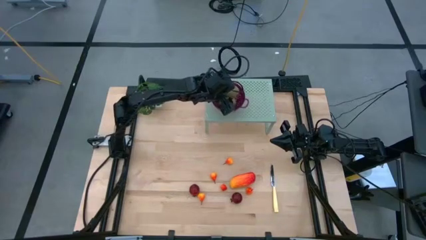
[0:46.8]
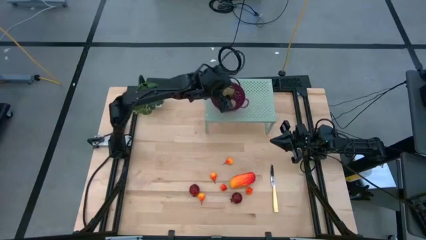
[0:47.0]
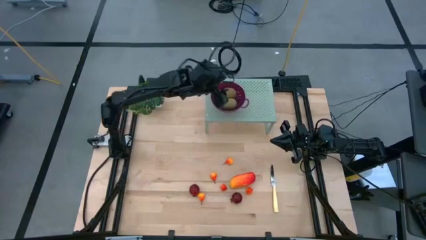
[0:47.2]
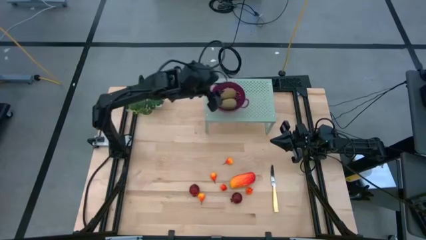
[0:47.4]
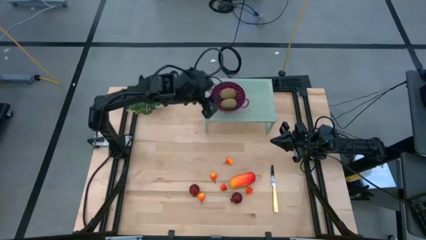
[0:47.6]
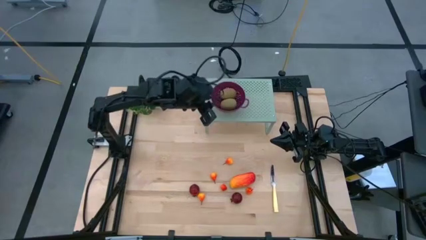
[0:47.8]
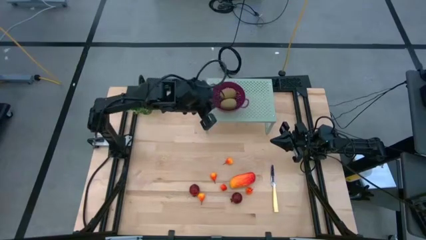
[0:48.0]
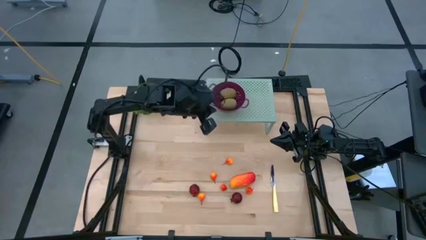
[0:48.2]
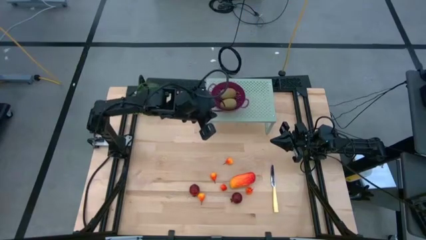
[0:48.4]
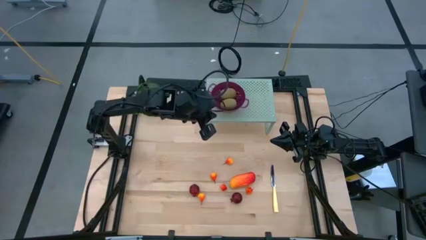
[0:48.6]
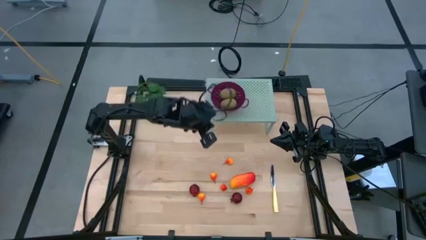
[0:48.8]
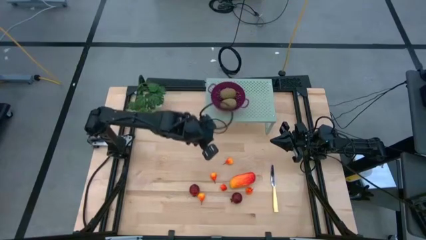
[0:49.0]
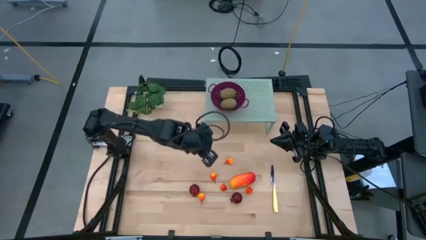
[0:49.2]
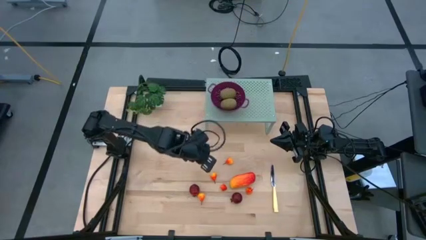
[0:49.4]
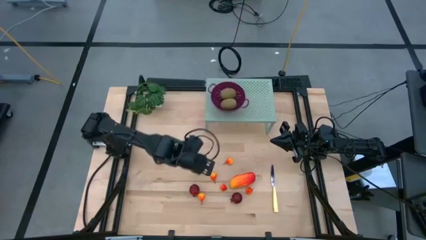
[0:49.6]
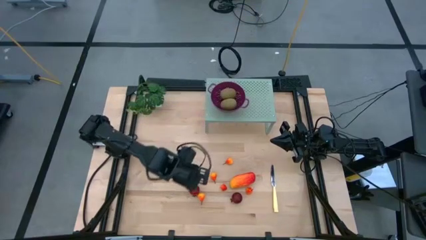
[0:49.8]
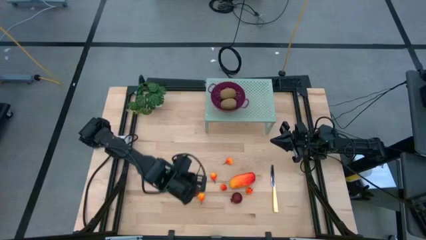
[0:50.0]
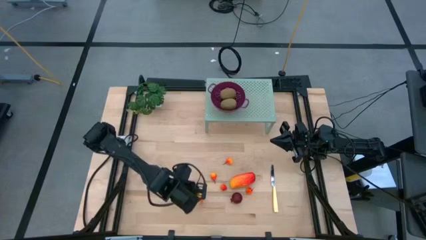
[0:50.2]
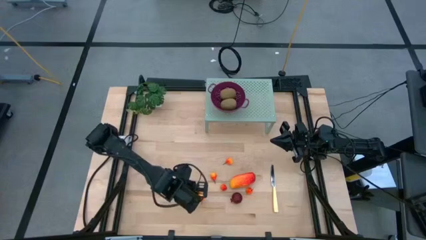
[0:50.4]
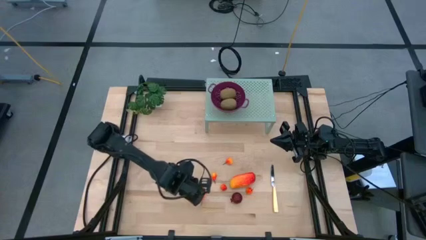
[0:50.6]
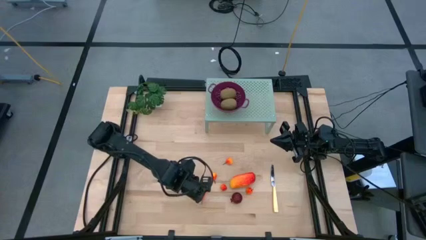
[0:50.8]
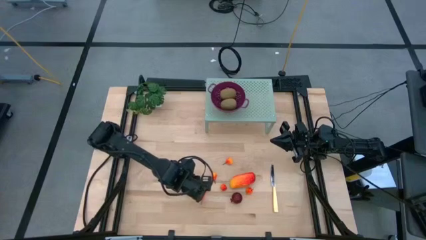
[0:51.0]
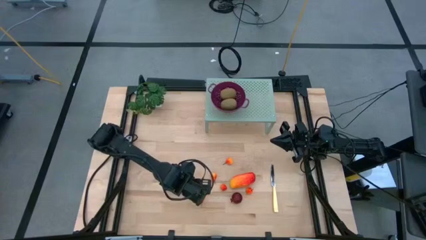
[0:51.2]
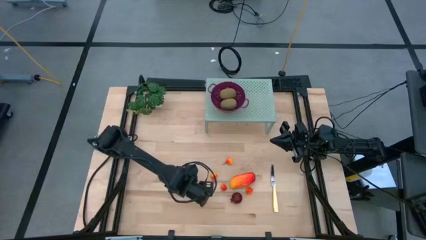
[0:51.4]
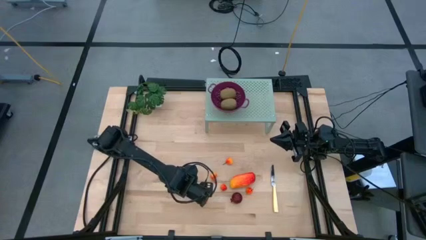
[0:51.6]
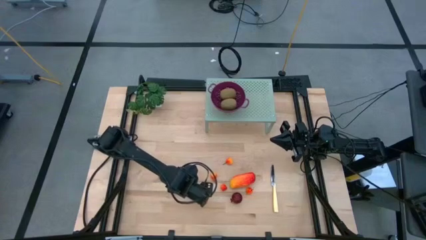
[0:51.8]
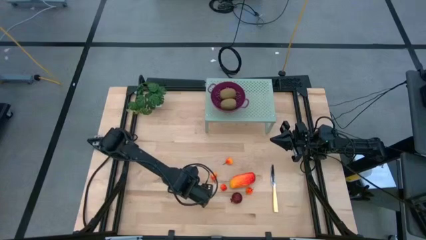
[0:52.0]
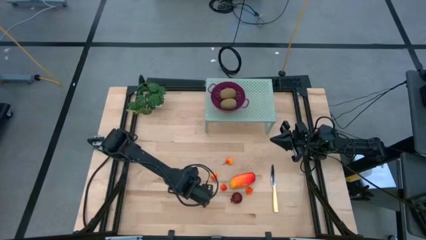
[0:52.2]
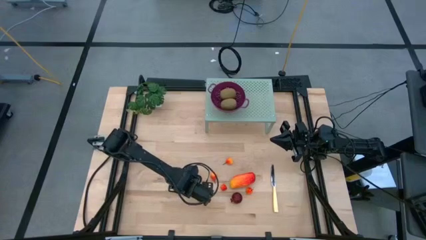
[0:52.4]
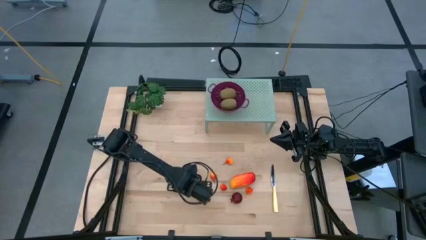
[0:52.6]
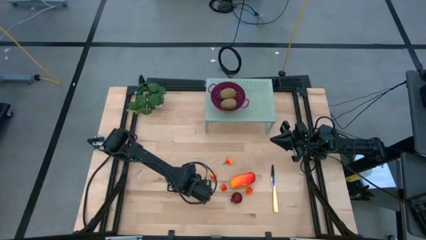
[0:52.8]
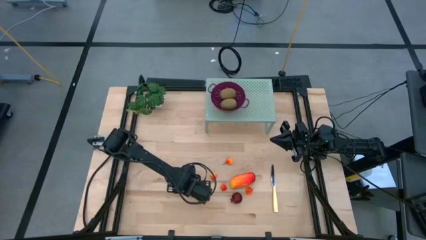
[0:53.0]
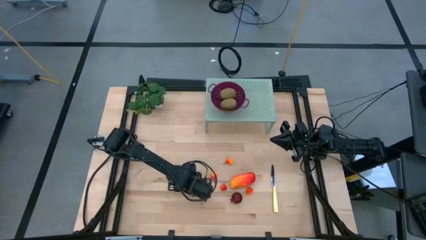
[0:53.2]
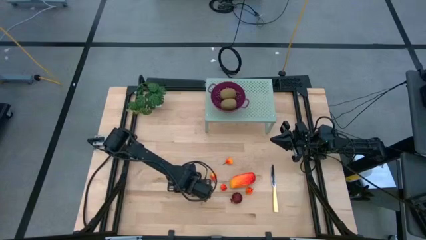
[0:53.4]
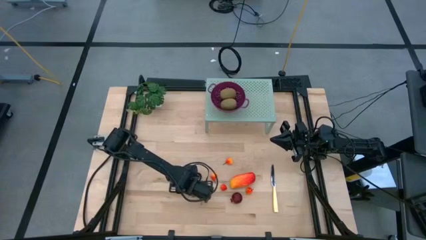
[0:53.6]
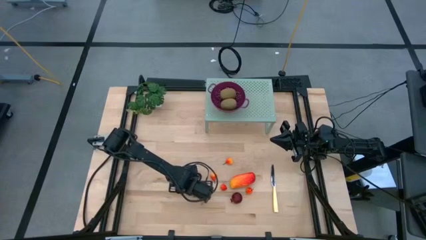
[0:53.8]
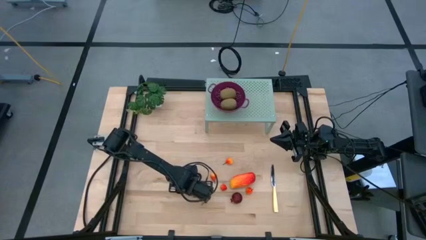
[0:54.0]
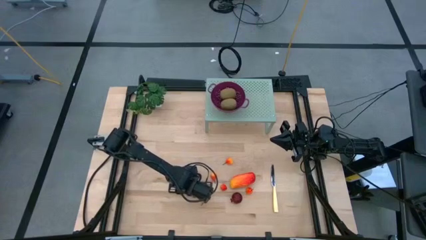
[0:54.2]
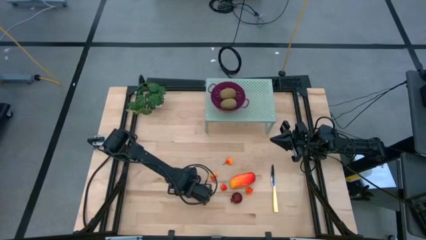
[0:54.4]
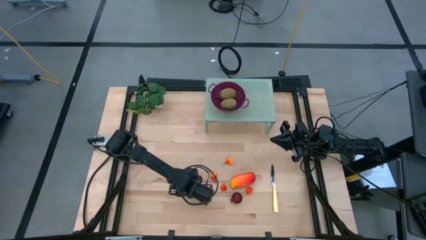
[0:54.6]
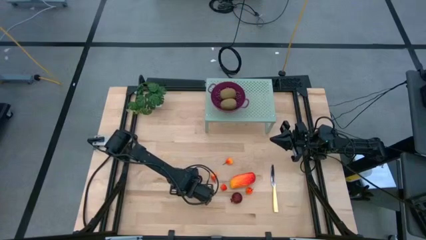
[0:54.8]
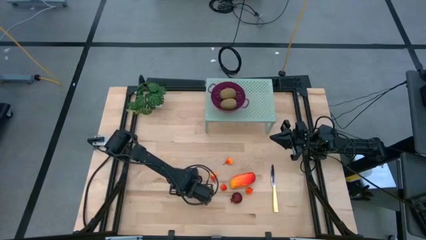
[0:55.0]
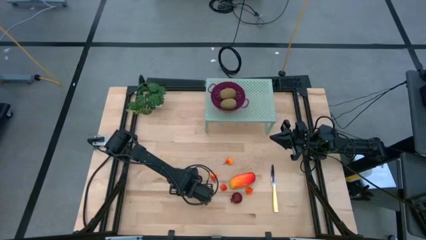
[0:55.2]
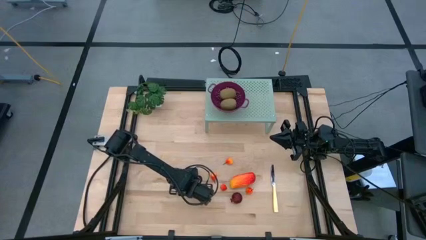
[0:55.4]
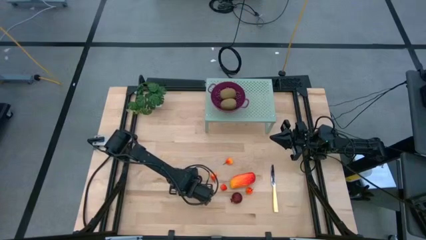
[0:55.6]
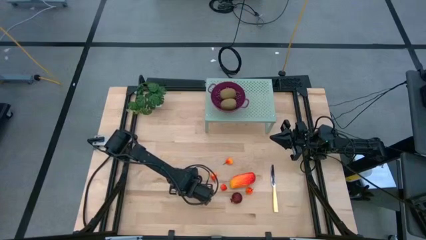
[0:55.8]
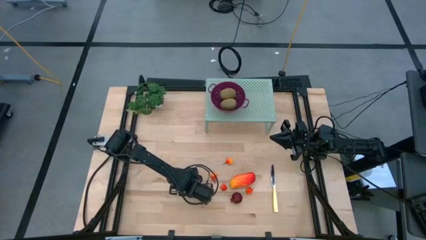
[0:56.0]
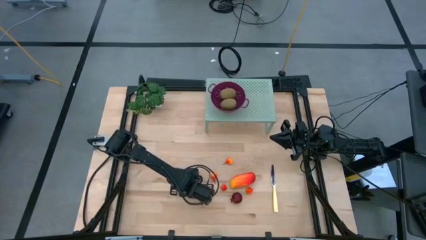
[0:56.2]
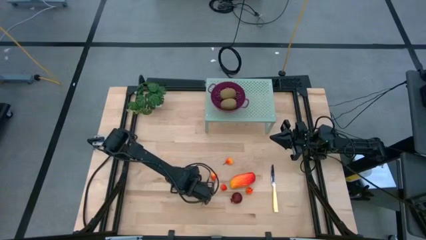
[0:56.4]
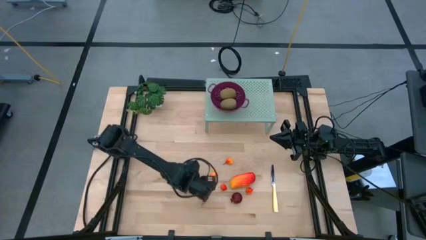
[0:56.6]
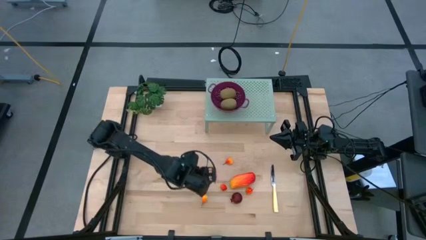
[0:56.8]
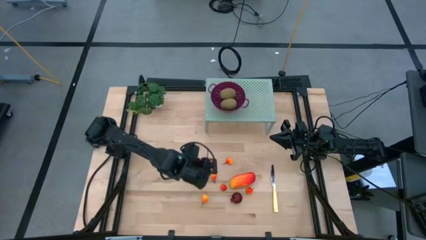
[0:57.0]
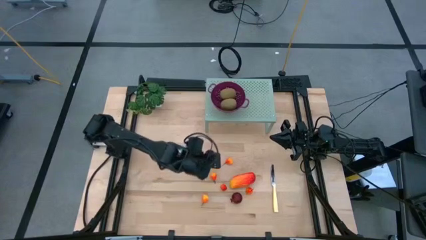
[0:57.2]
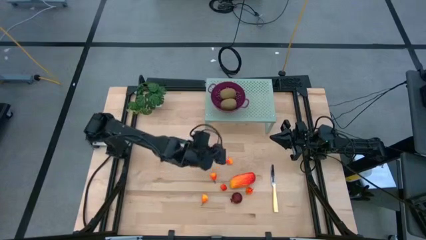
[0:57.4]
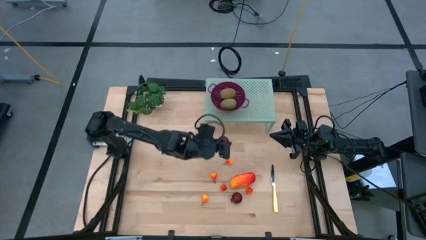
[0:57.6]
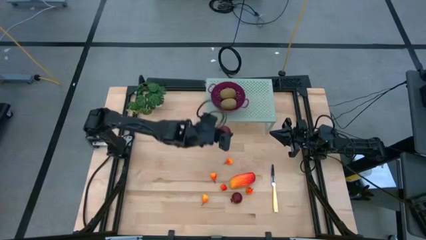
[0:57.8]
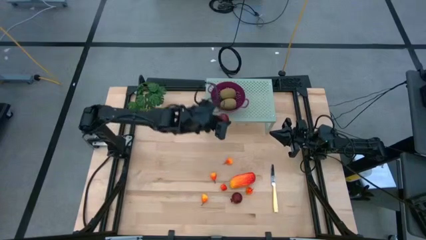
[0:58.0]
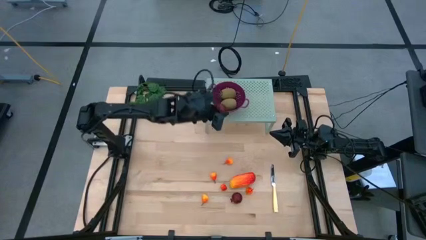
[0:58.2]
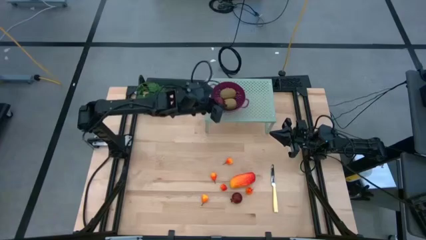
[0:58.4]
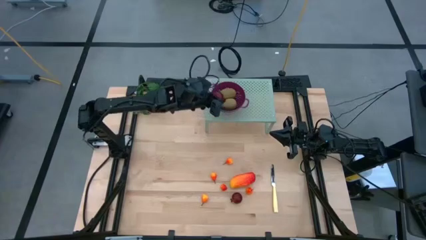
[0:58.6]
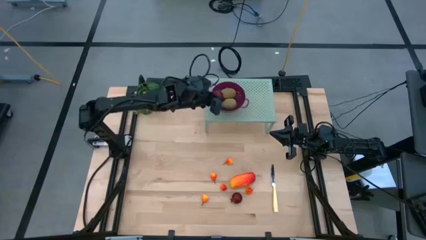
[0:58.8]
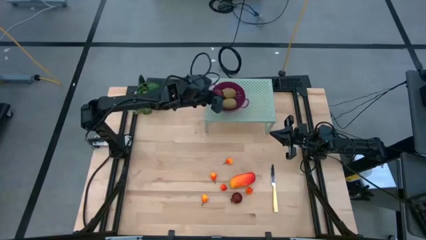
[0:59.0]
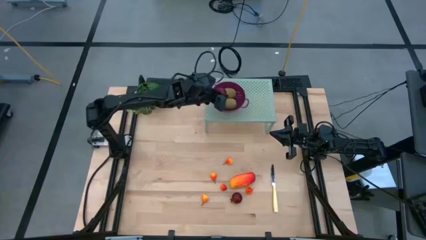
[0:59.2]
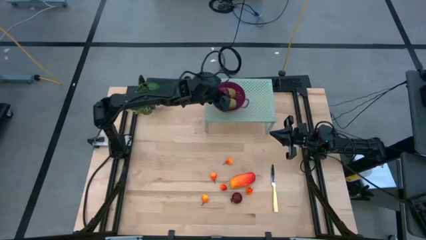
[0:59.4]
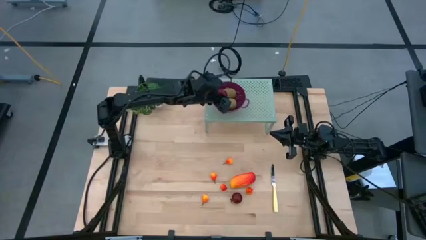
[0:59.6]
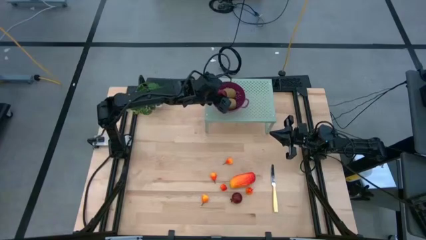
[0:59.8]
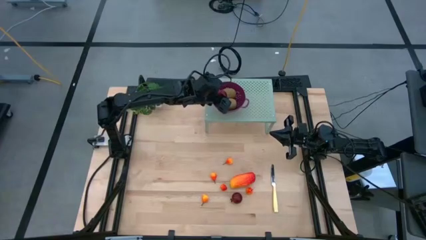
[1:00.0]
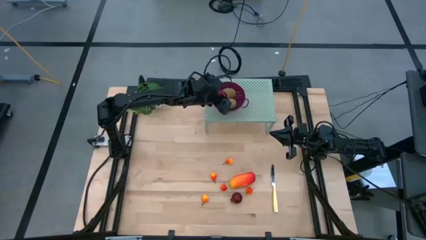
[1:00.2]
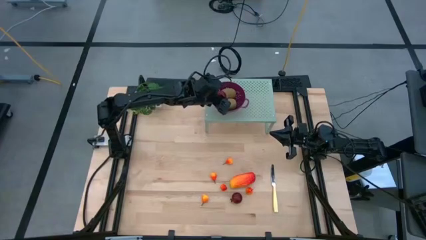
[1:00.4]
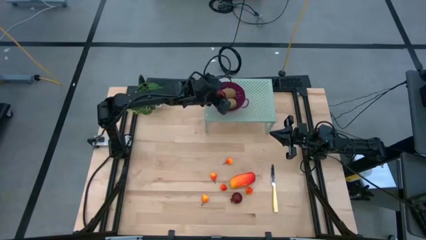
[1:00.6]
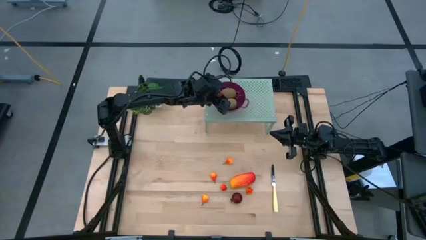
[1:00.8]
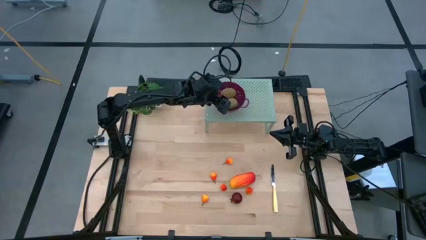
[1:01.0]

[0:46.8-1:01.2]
Task: Pick & Place Fruit
Put the pomegranate into the strainer bowl on the shelf

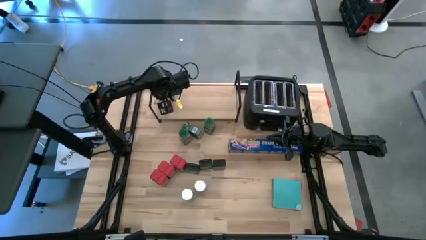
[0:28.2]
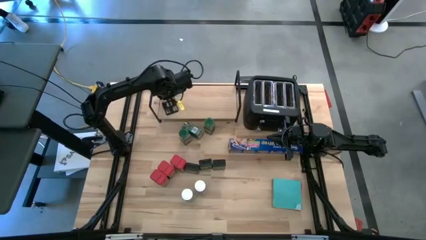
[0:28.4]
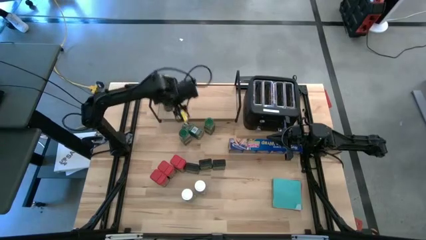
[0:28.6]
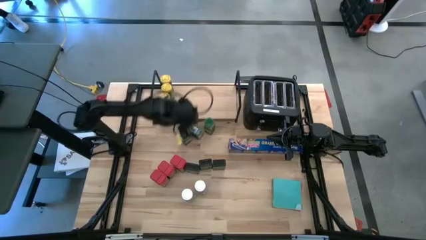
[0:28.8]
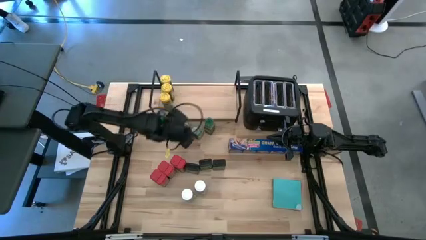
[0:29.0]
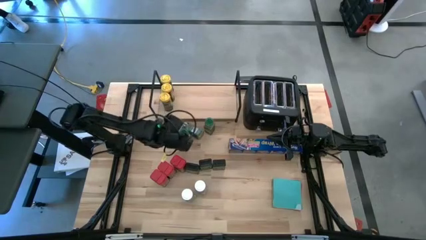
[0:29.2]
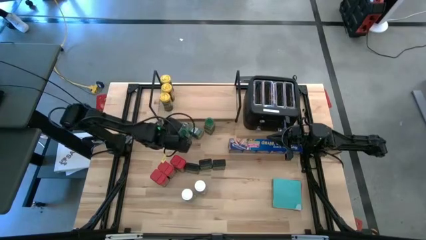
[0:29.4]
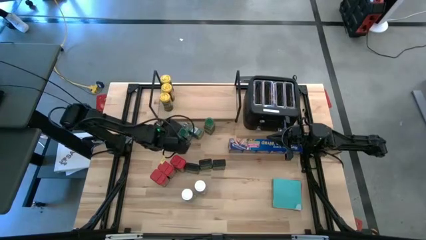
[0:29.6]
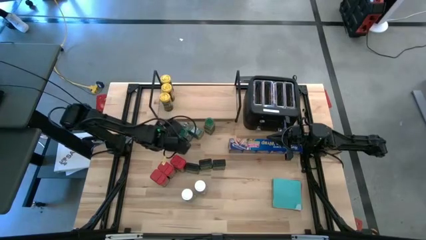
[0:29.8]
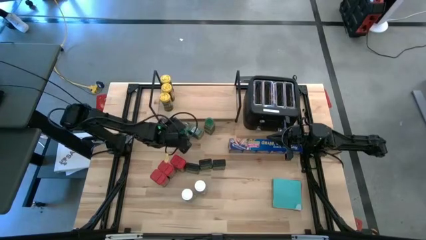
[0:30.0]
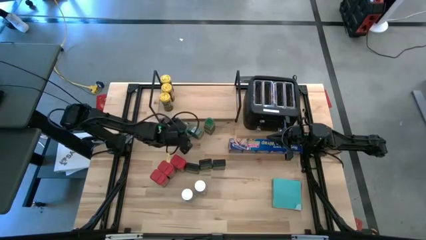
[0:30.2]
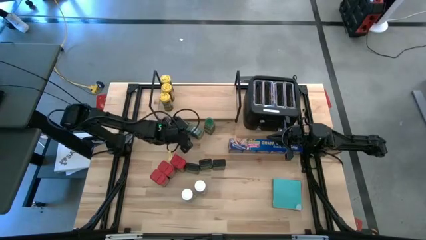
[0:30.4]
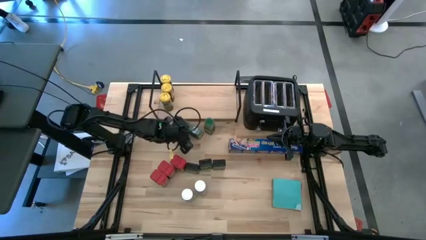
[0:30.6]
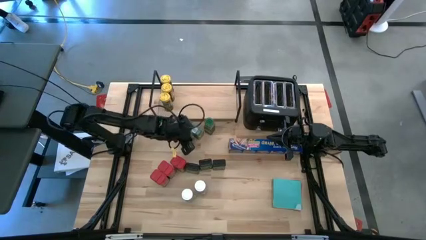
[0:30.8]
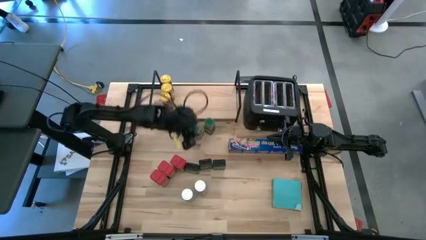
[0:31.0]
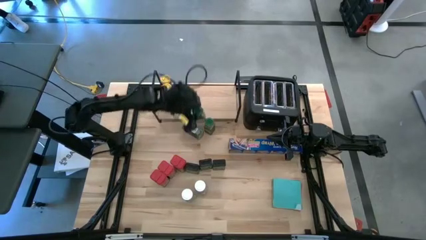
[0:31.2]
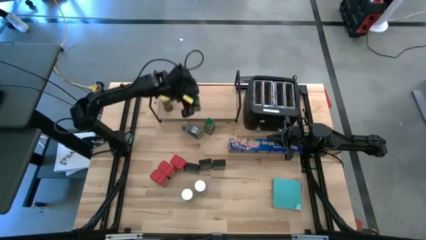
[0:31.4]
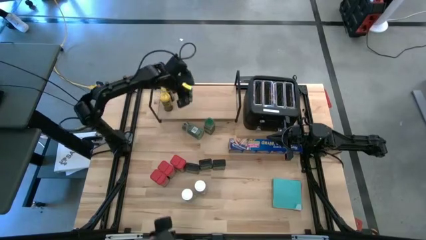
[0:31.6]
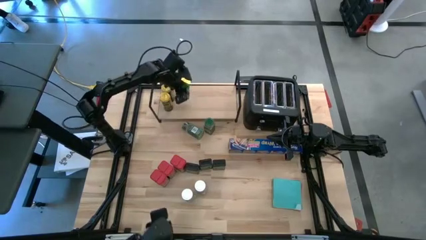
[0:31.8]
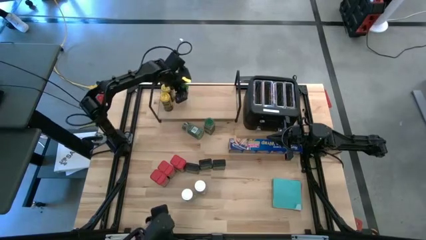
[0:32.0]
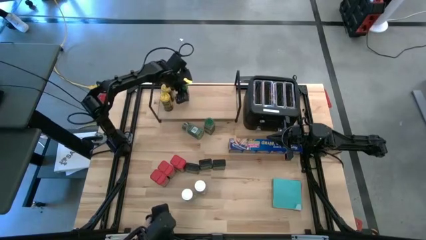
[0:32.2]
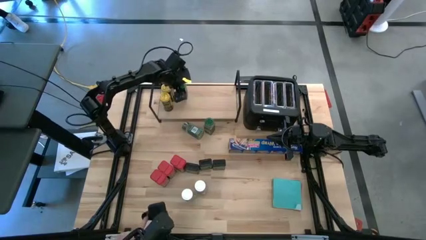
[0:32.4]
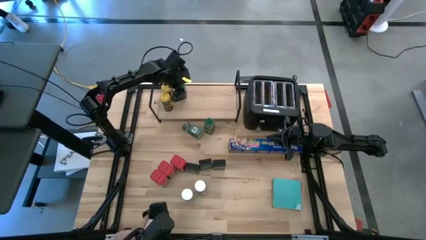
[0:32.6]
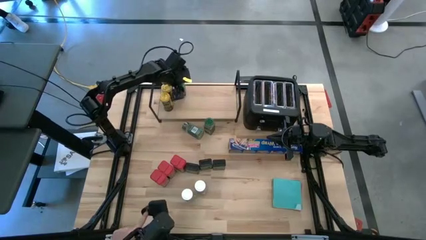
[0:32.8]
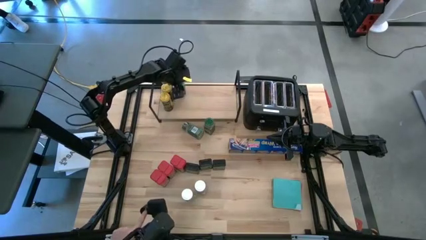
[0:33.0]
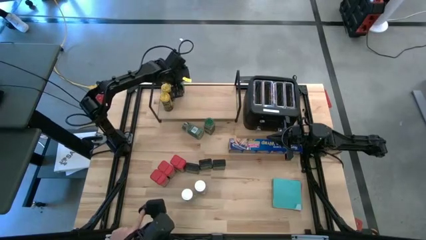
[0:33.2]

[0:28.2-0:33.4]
Task: Shelf spices
Put the left green seasoning bottle on the shelf
